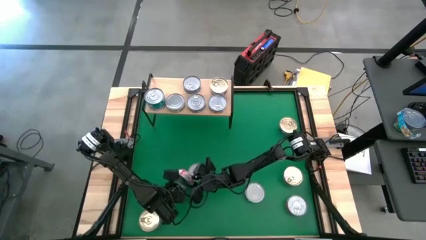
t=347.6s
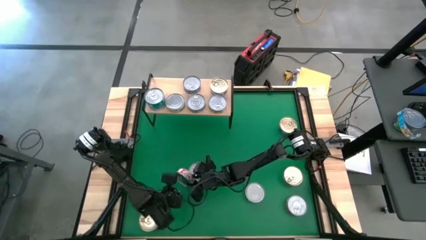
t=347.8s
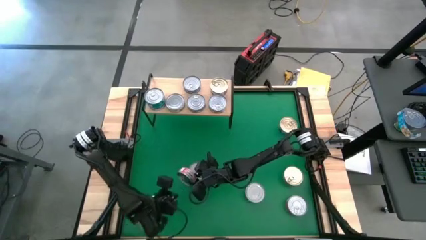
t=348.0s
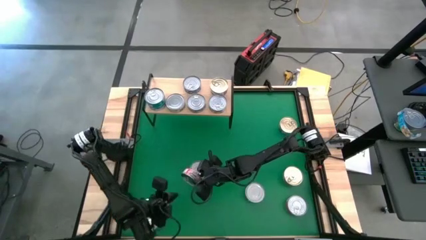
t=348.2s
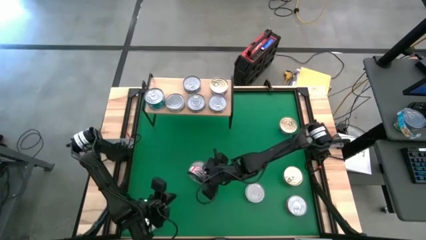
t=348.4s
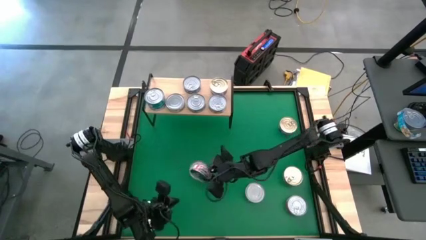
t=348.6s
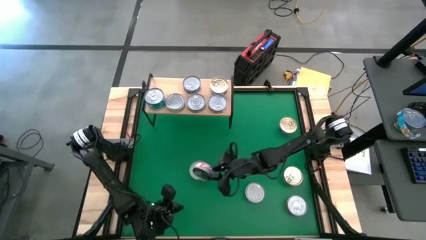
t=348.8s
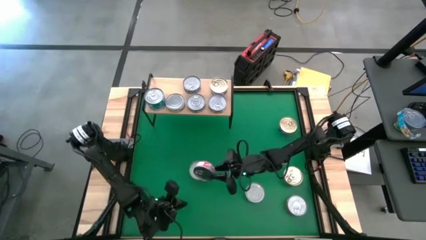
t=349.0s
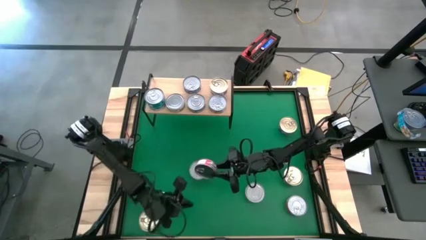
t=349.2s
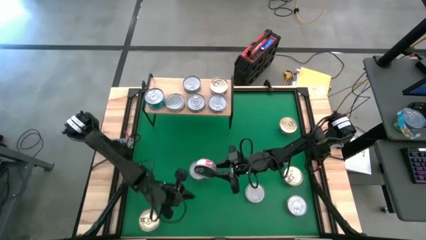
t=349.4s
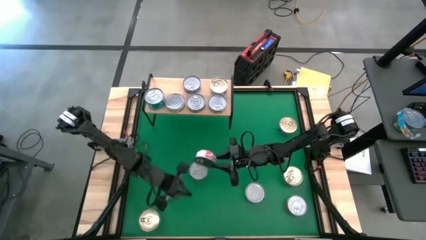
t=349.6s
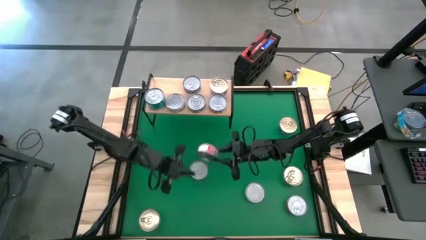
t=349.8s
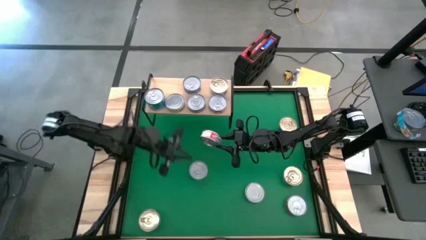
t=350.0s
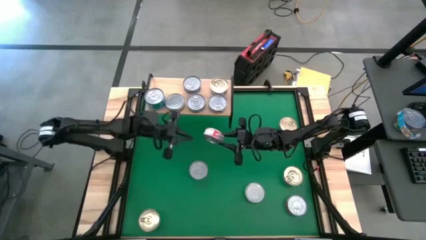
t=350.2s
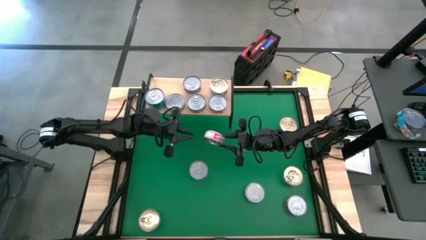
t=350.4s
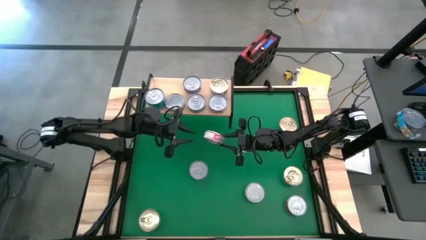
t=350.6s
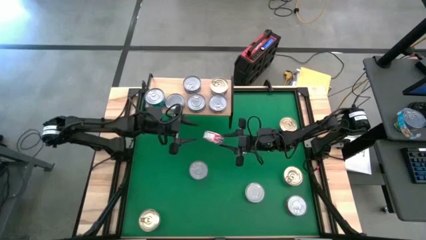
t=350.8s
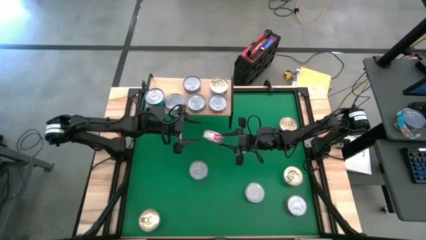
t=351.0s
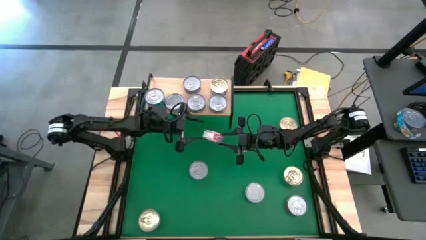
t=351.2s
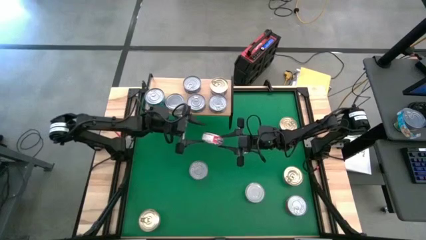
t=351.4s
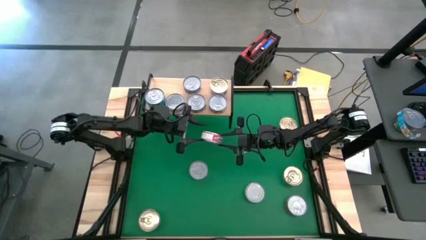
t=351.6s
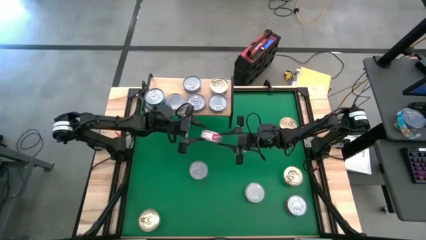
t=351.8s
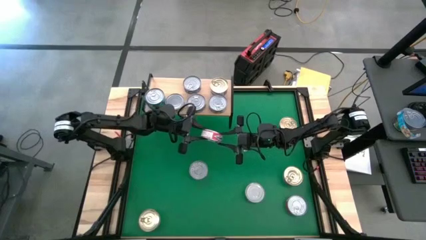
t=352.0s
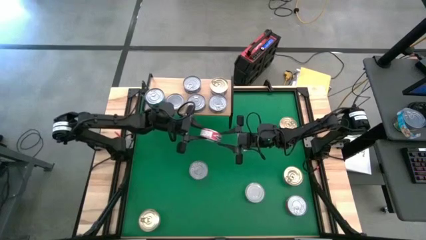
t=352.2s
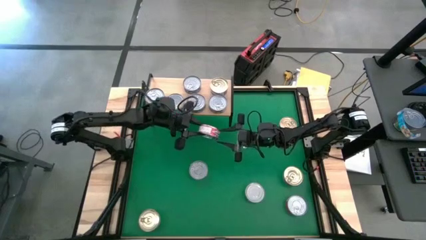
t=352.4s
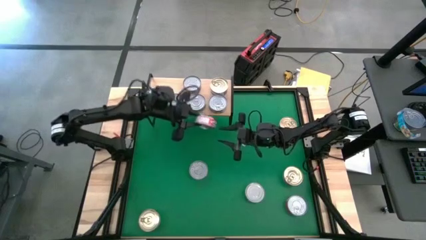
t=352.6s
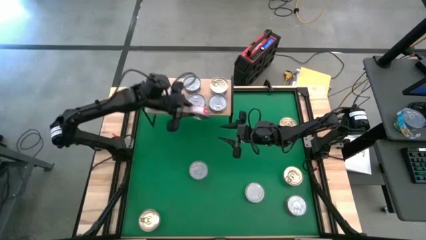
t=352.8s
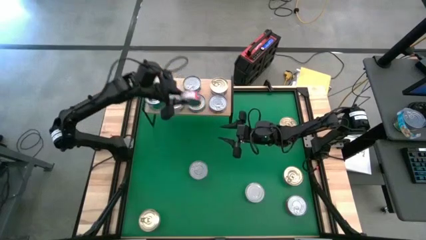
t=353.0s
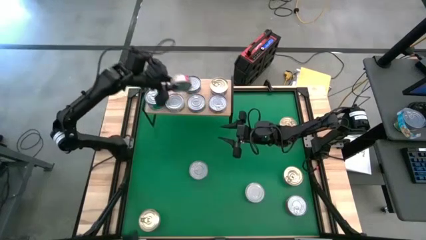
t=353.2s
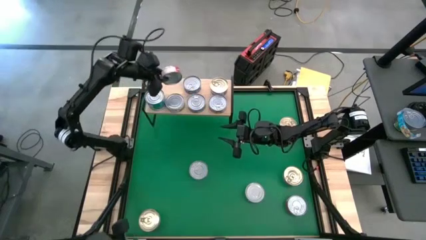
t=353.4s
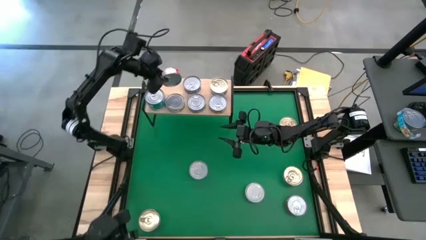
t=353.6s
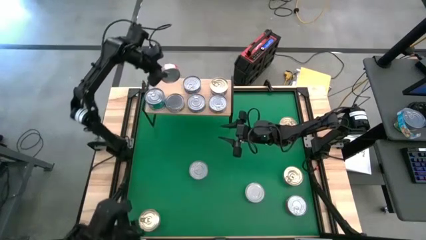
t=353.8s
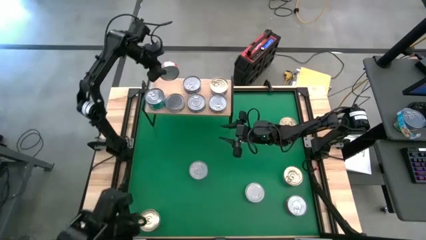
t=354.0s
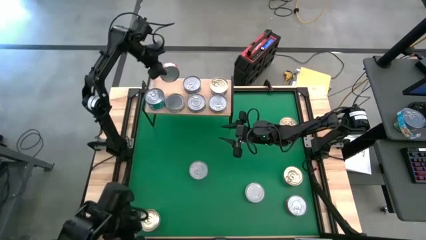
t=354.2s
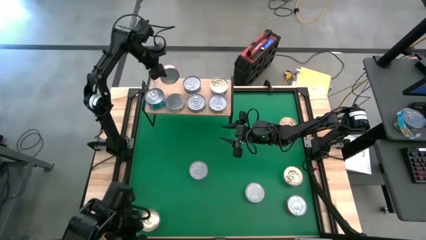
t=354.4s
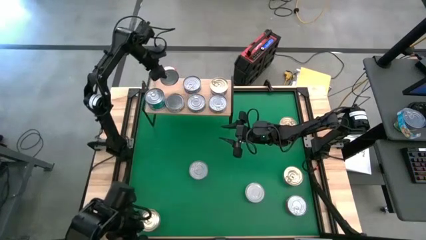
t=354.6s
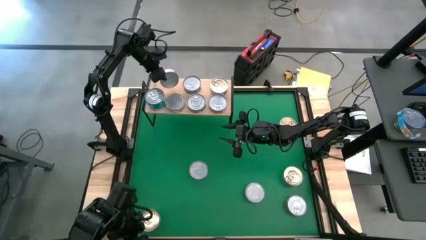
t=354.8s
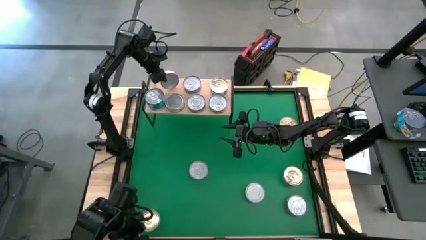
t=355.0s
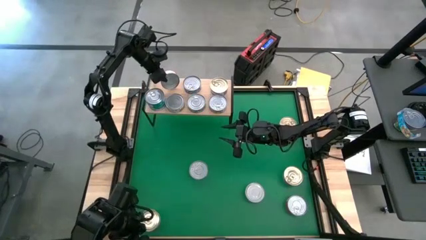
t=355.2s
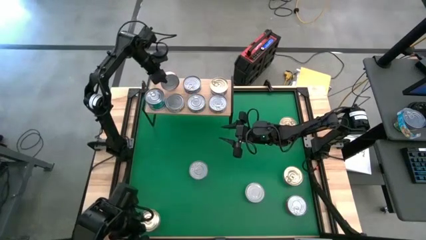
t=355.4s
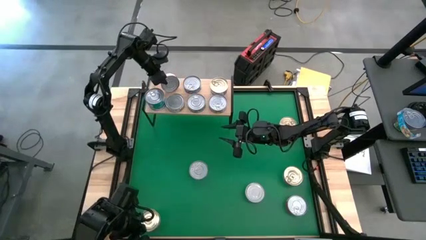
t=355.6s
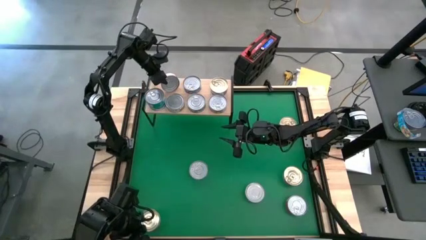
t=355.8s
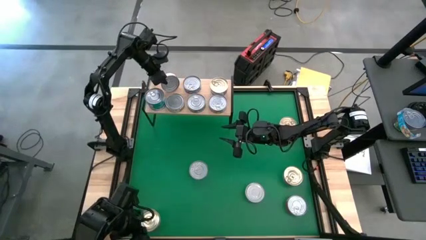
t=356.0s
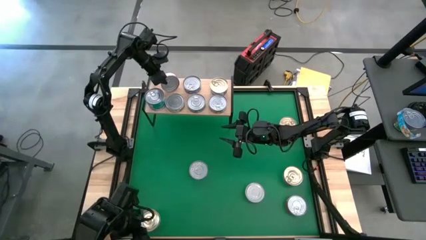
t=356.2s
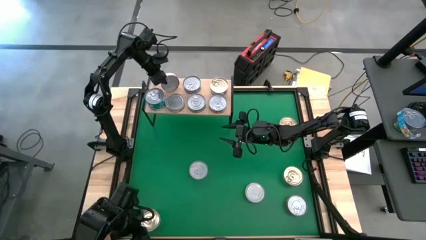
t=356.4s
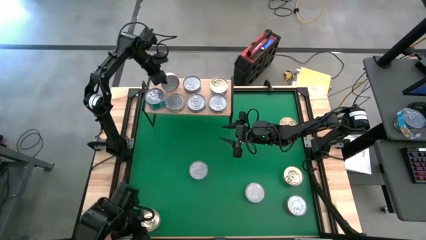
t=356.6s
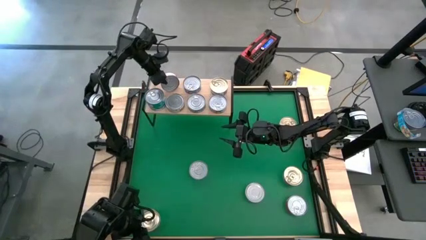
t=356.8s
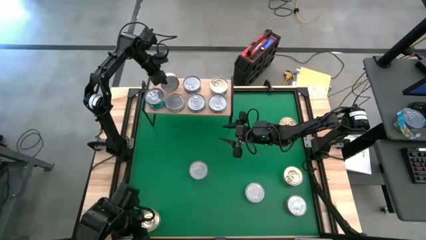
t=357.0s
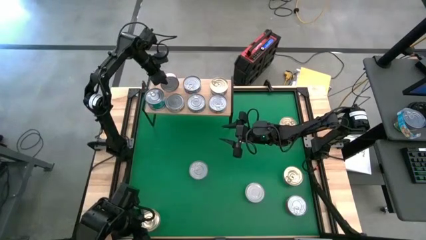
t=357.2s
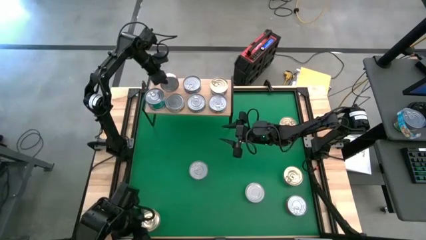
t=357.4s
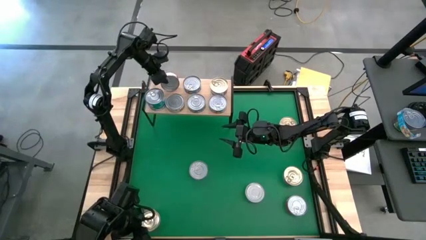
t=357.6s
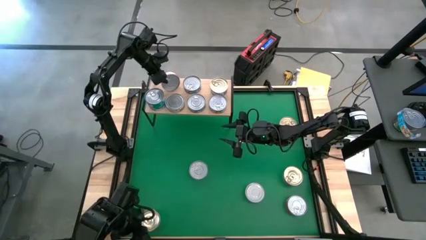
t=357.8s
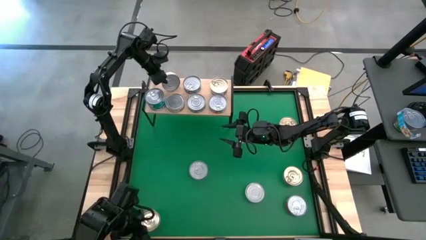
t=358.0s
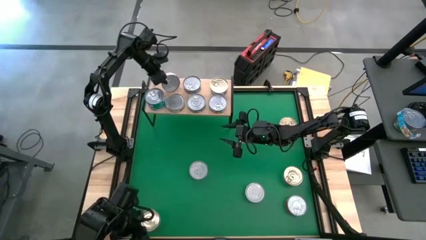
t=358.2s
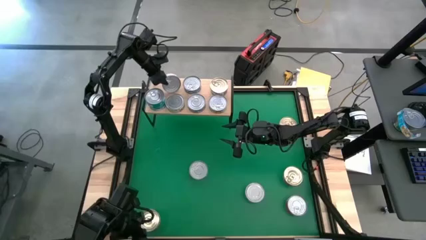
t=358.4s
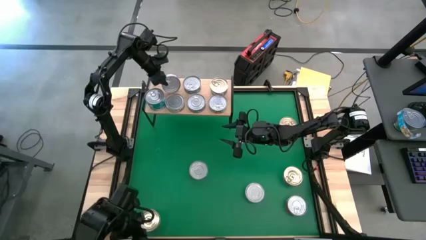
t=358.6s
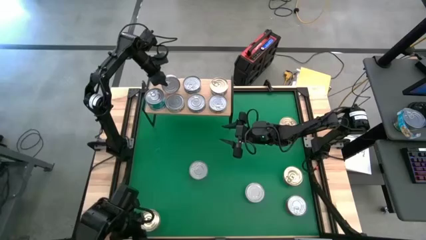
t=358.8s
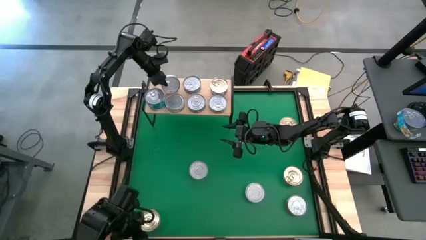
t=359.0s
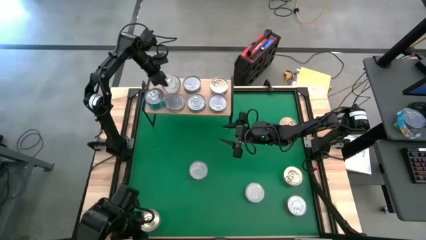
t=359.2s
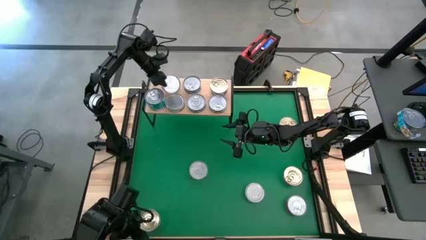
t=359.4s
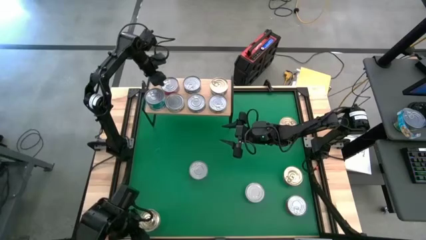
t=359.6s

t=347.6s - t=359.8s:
Task: Stack canned seafood by type on shelf
Put the middle left red tuna can on the shelf
